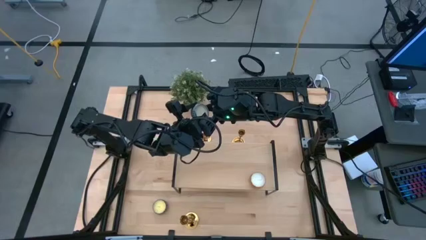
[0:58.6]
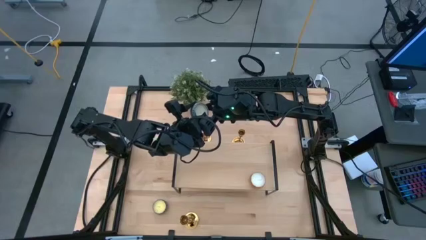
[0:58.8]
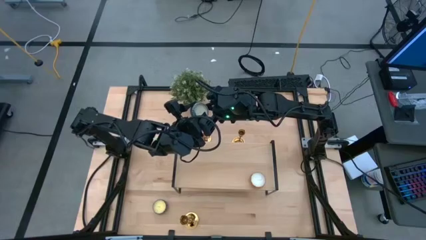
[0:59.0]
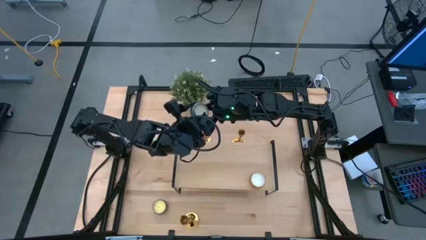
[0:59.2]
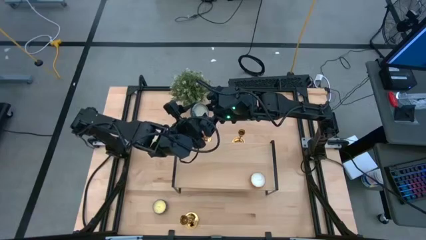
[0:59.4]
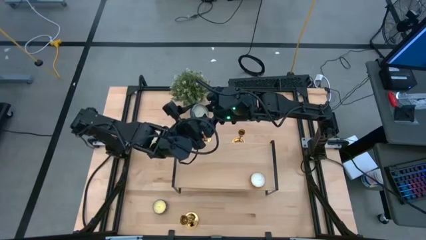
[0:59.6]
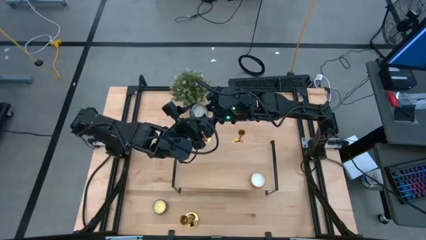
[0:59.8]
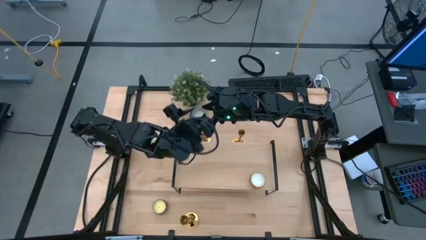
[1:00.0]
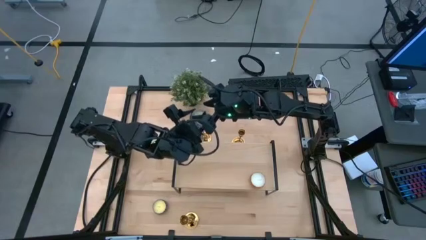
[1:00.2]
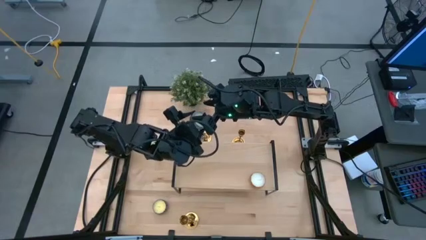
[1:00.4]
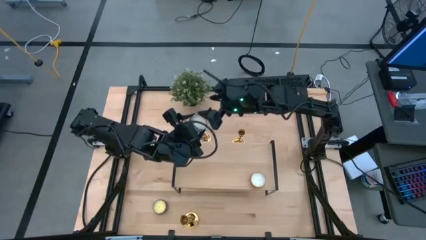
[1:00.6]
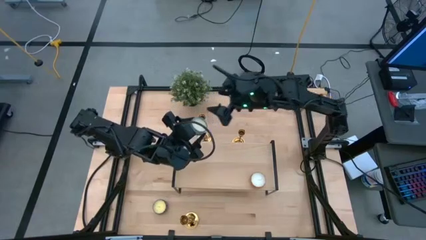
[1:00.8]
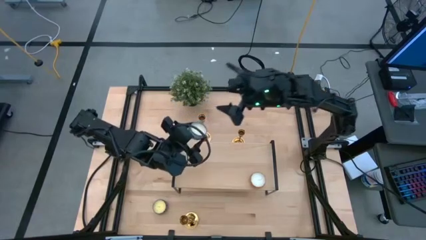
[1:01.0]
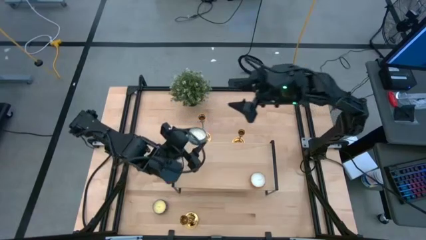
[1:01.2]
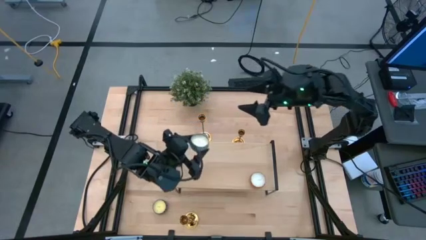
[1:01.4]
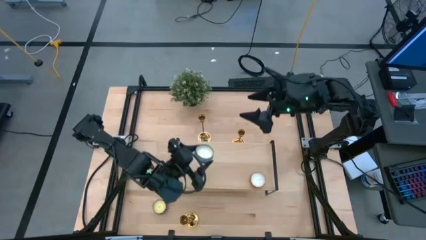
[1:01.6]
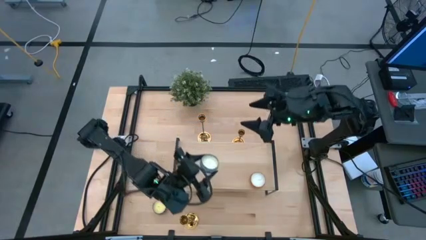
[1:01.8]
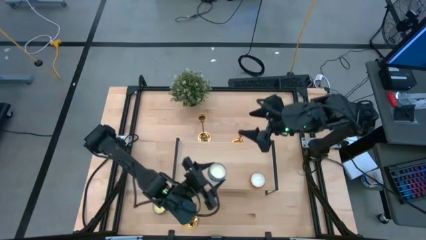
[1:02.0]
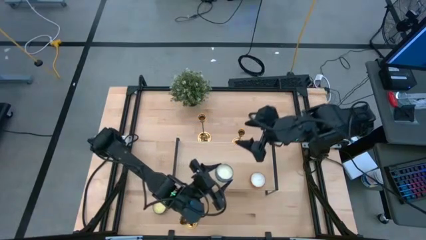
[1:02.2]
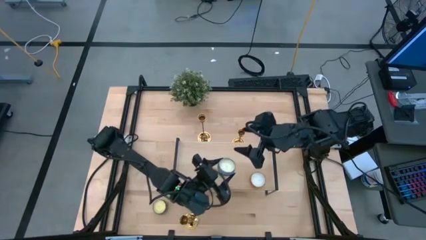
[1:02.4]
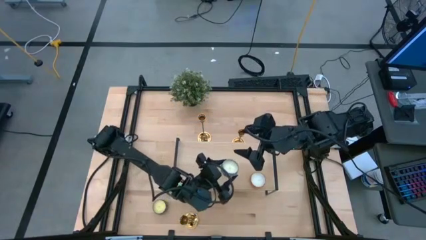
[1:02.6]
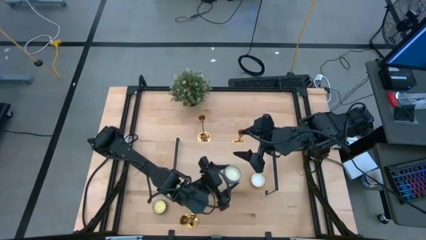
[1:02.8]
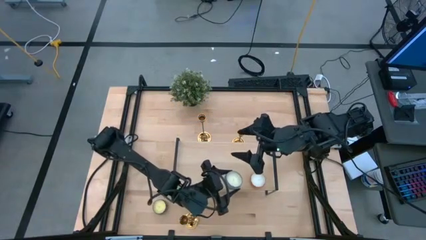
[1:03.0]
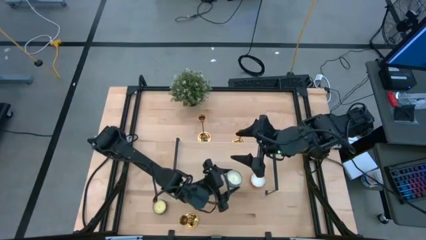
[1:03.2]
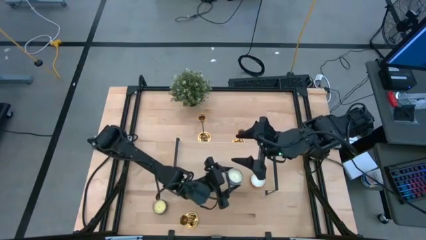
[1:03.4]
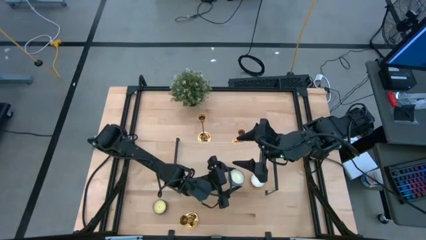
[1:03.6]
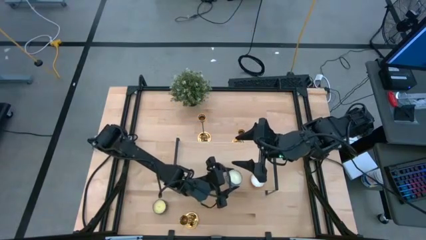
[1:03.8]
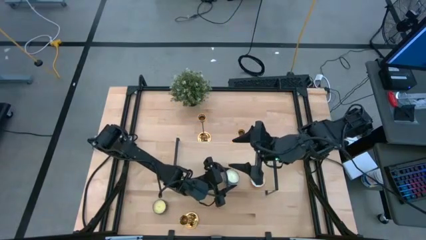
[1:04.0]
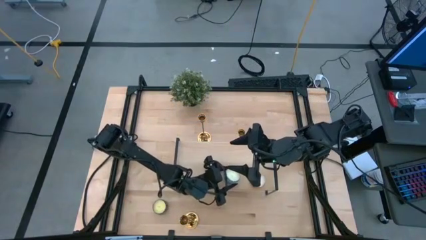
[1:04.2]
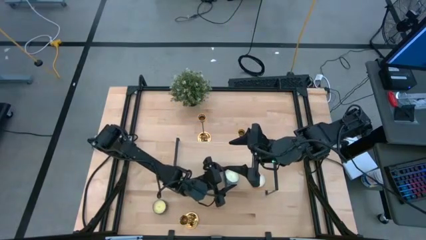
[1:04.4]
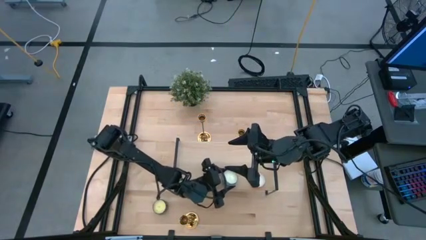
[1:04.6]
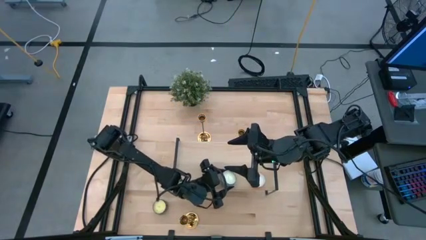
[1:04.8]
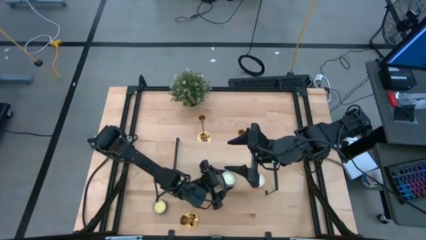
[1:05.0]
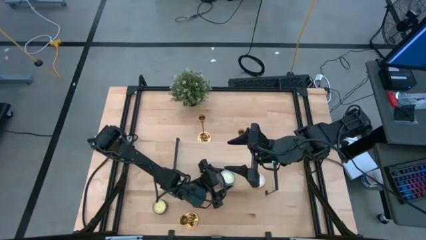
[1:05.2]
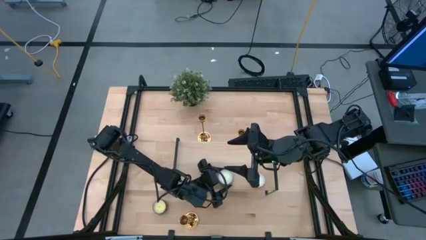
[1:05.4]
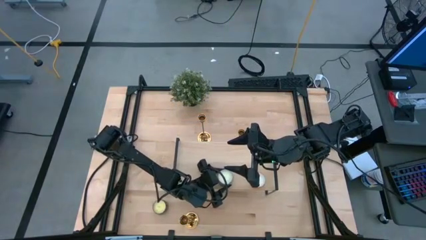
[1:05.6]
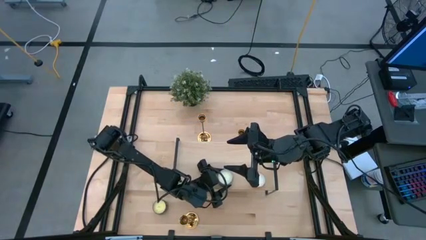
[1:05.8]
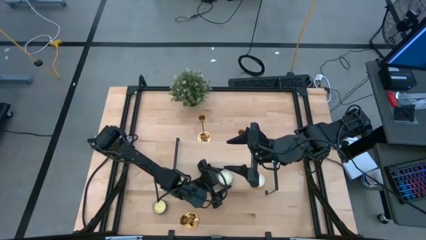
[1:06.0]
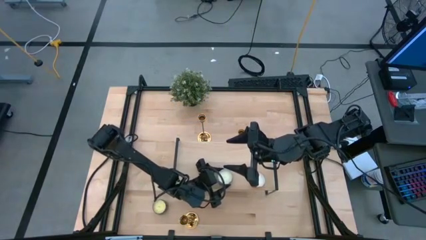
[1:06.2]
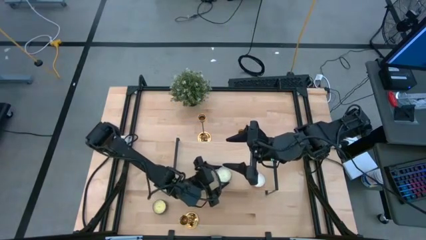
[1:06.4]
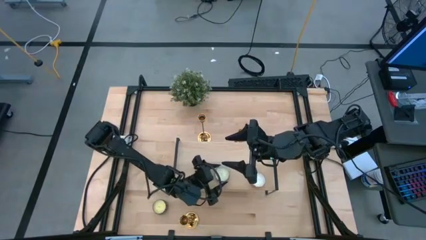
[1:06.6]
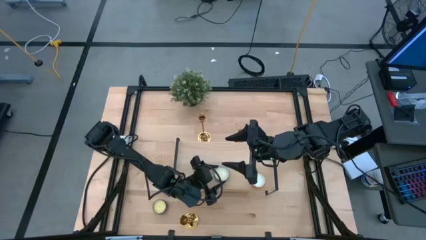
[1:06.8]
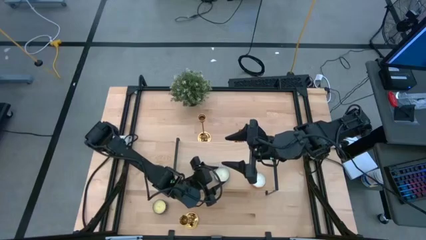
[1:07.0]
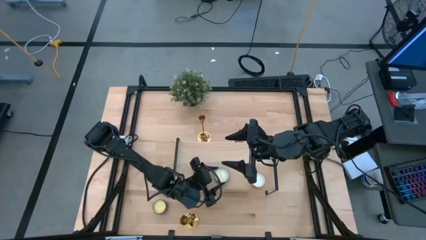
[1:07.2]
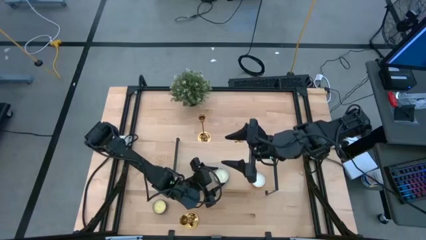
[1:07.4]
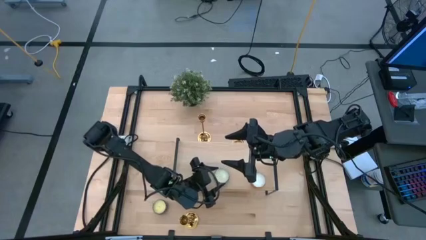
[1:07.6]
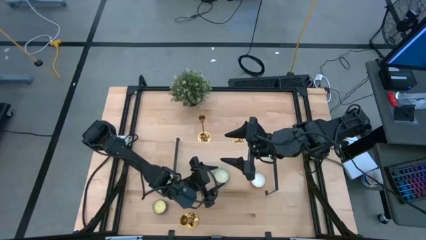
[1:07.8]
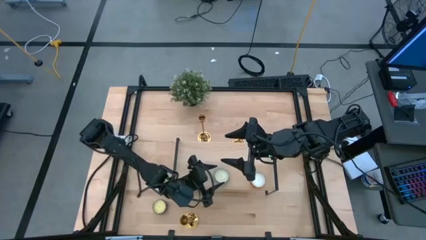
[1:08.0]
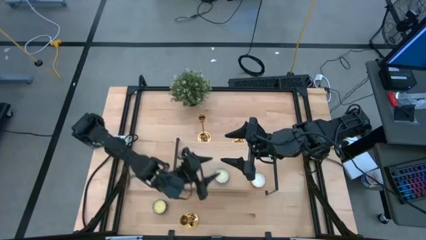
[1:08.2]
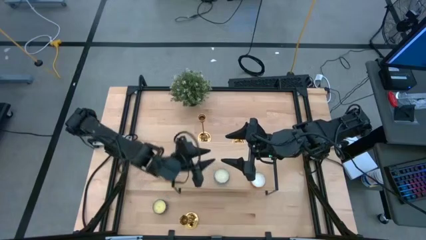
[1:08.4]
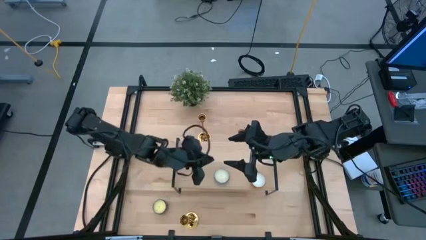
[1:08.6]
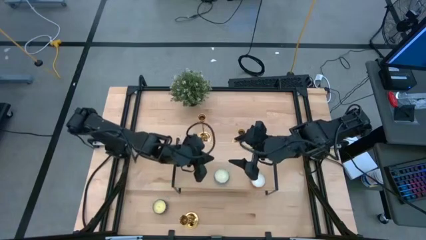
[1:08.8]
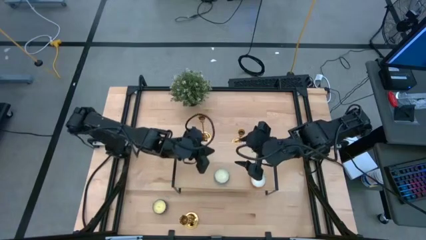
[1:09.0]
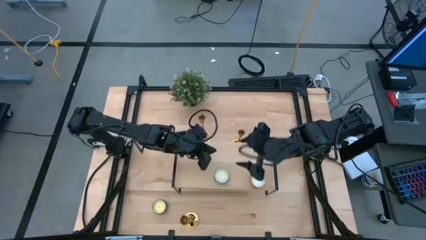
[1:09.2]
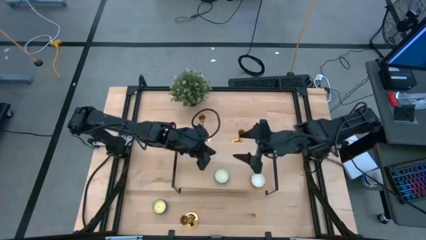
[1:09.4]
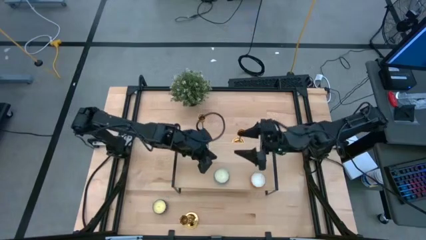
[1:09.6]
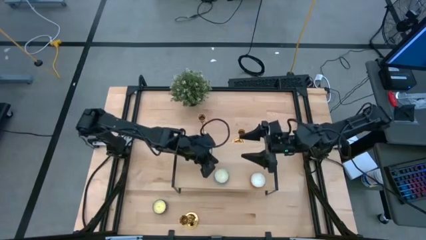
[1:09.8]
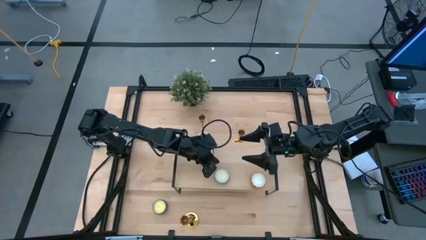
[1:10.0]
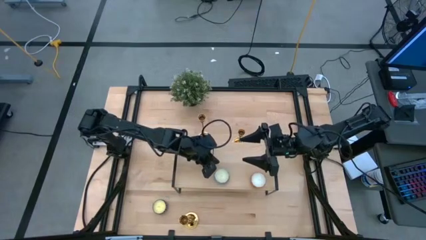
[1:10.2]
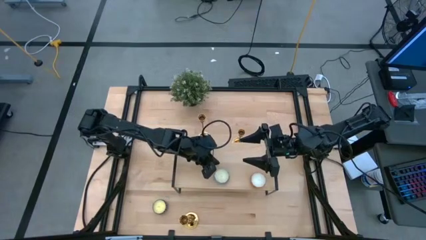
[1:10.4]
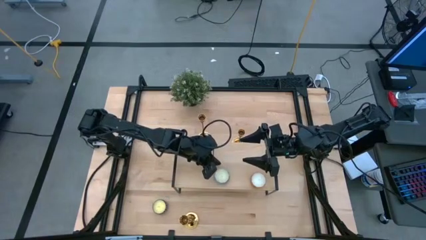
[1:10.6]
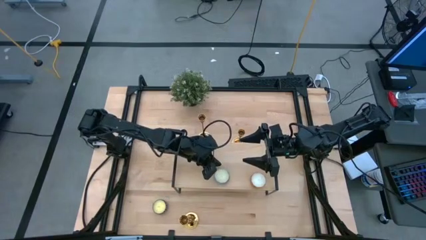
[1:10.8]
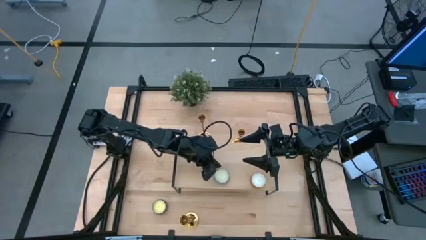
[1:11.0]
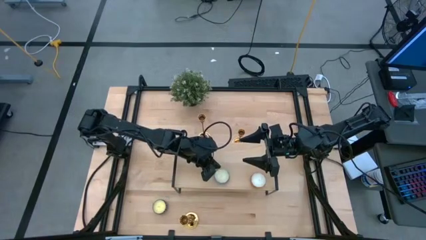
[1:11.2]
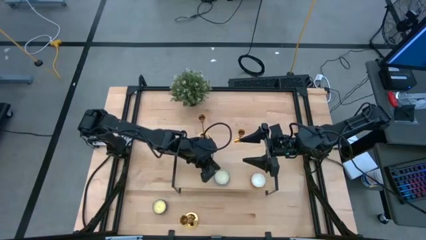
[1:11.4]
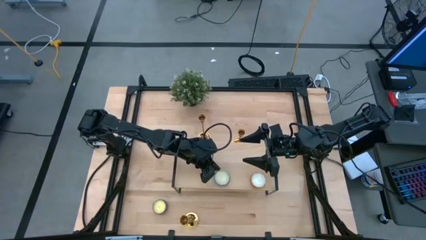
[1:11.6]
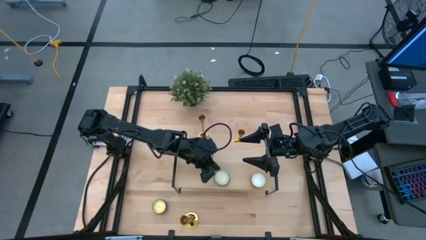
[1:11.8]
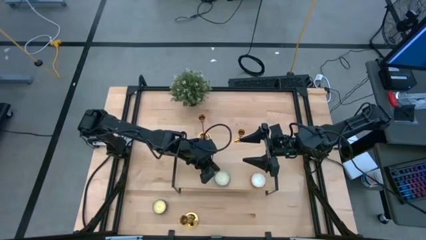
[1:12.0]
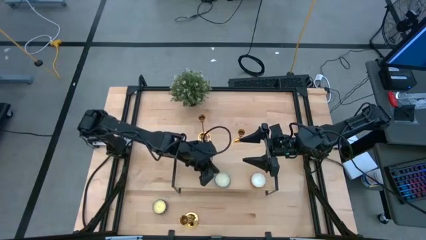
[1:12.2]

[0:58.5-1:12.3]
Task: Pick & Place candle stick holders
Put the blue scented candle on the shelf aligned with the orange scented candle

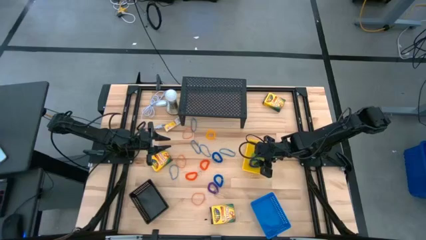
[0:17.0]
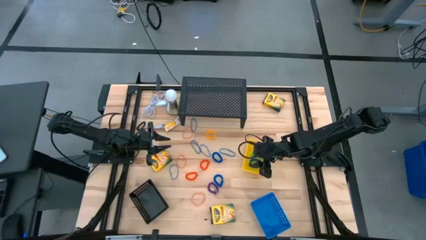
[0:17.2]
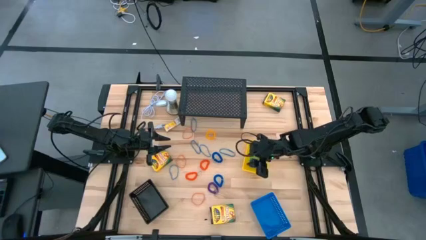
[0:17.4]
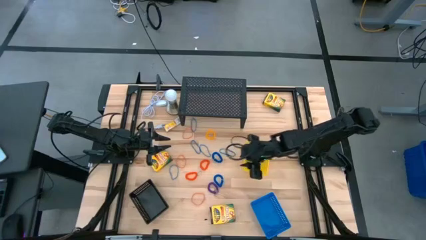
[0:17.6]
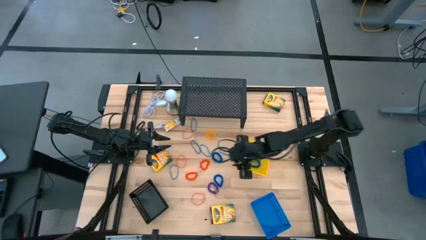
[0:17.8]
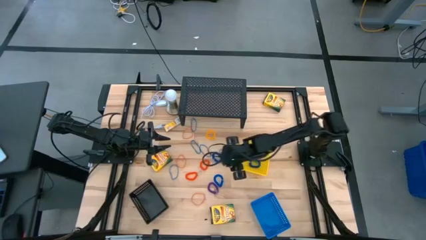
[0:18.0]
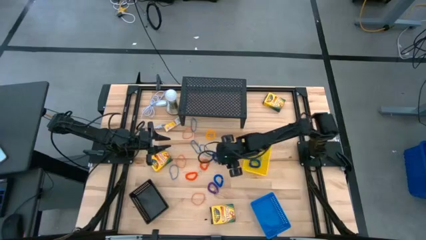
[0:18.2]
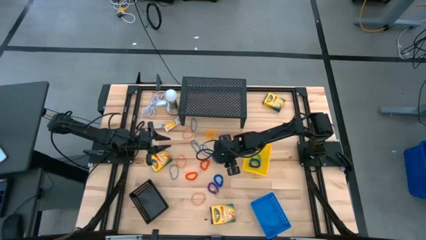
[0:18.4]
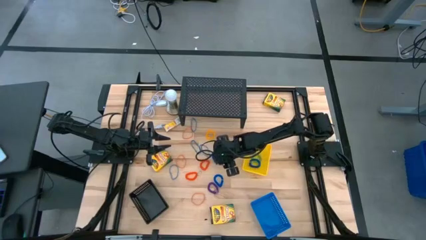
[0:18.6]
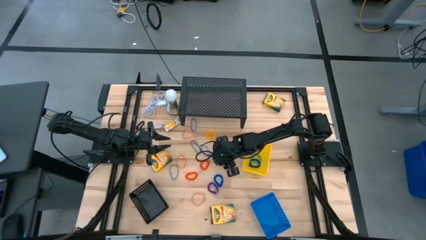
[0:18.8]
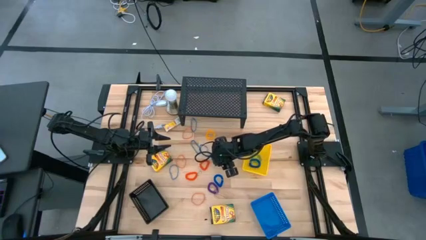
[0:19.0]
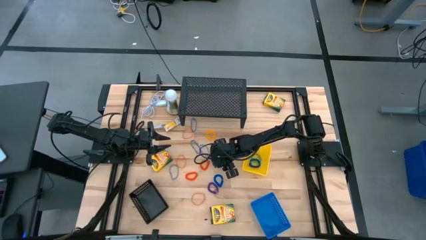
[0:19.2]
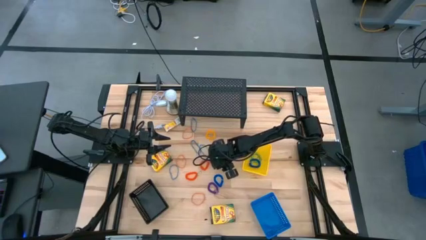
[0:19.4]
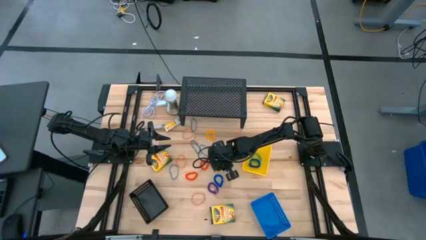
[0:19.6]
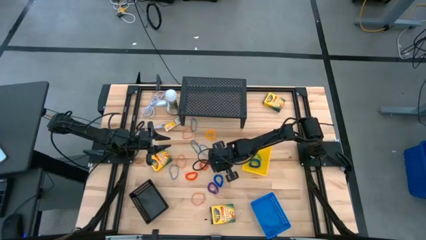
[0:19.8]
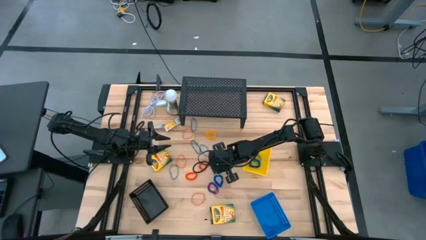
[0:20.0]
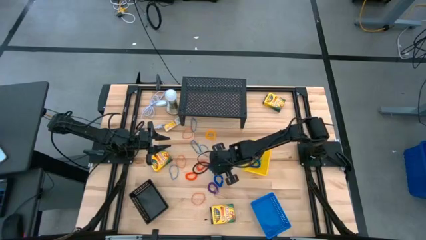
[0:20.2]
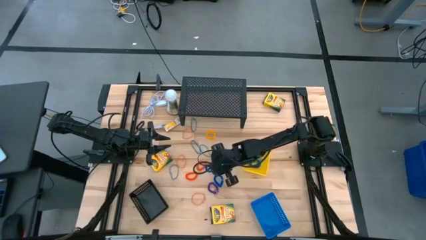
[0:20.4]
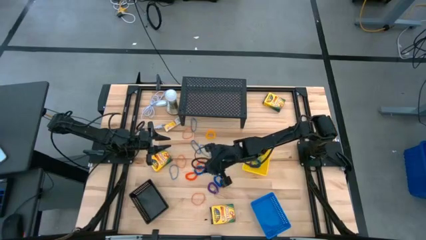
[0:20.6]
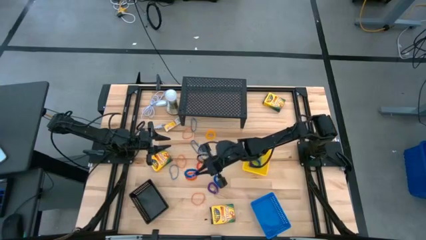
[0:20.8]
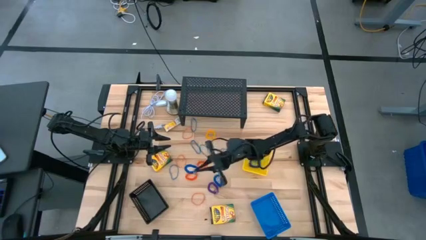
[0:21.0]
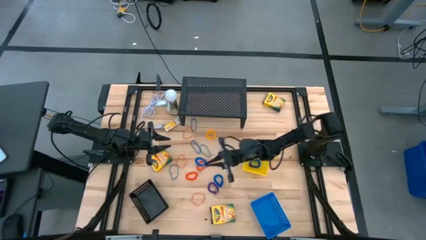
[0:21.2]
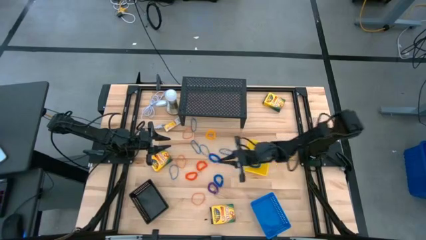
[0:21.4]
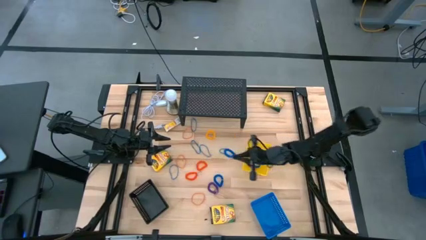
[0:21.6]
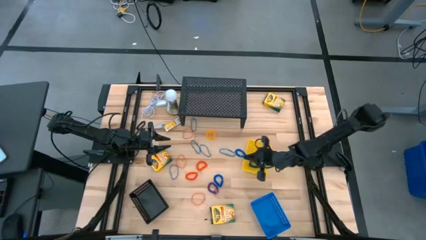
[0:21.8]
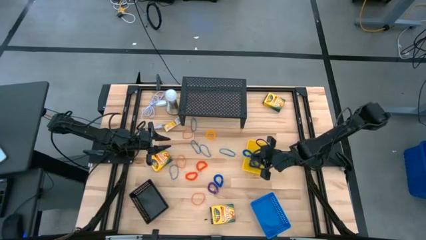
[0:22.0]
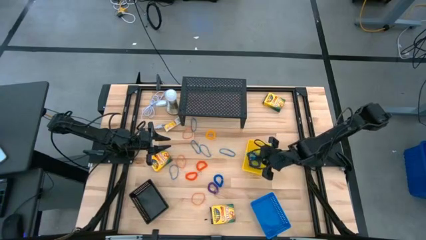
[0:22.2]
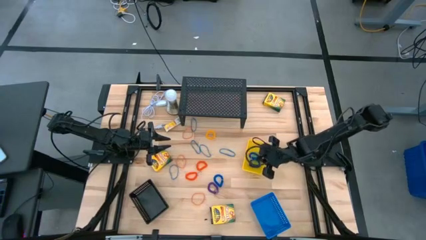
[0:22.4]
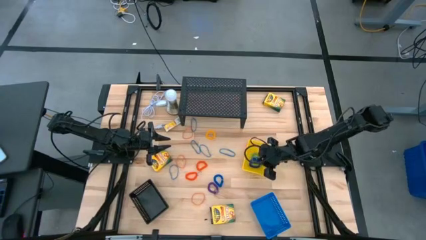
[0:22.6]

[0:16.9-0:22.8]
Task: Pick & Place Office Desk Supplies
Put the blue spring keychain into the yellow basket
